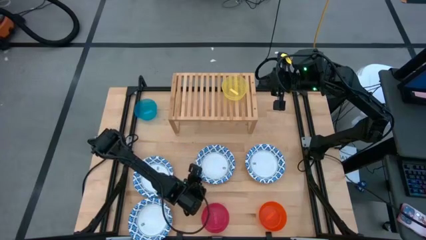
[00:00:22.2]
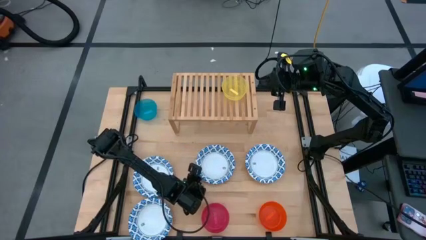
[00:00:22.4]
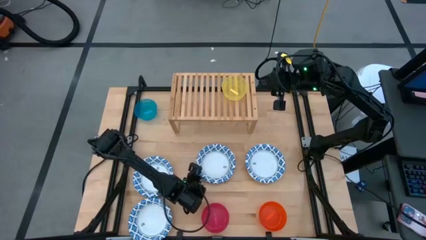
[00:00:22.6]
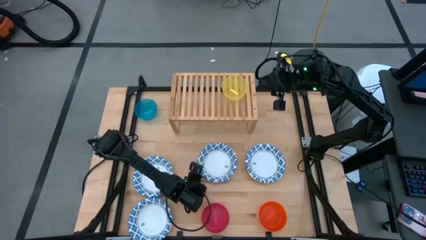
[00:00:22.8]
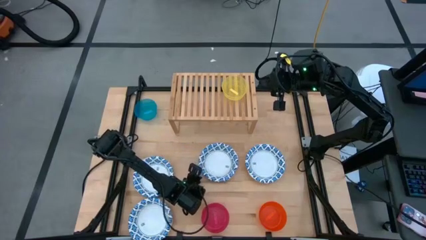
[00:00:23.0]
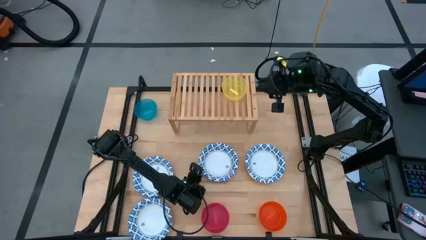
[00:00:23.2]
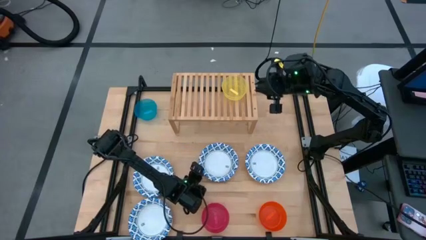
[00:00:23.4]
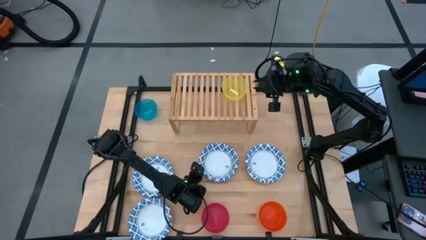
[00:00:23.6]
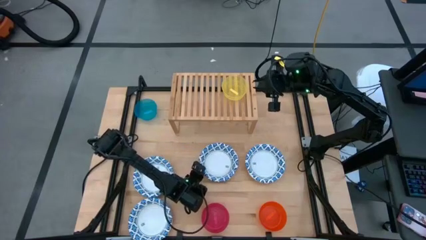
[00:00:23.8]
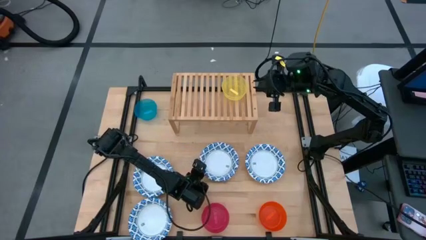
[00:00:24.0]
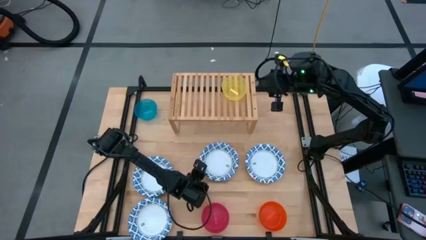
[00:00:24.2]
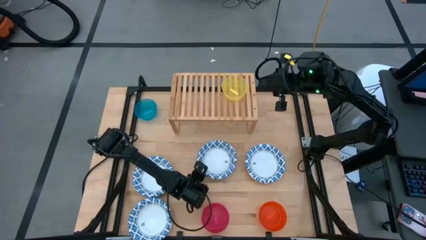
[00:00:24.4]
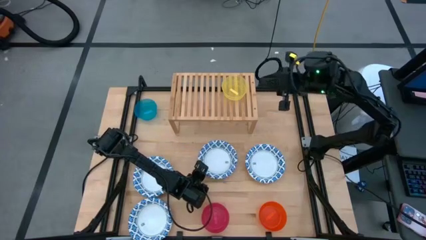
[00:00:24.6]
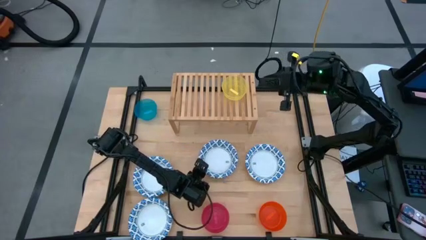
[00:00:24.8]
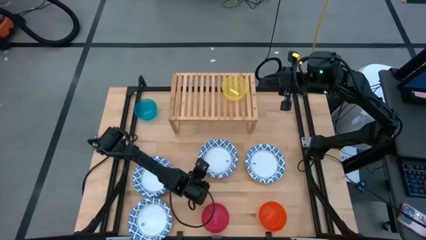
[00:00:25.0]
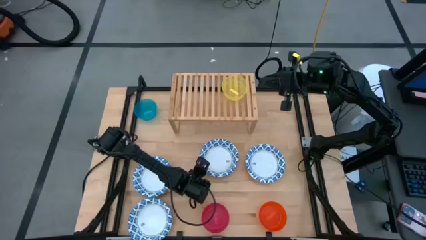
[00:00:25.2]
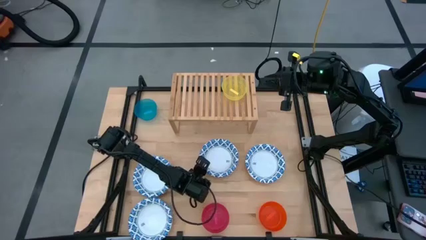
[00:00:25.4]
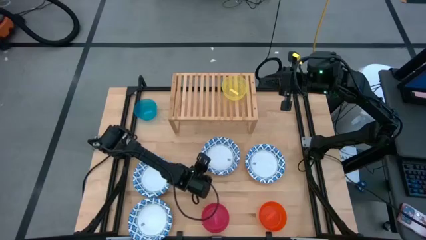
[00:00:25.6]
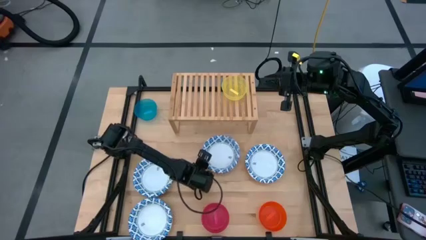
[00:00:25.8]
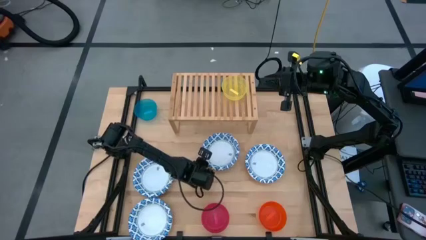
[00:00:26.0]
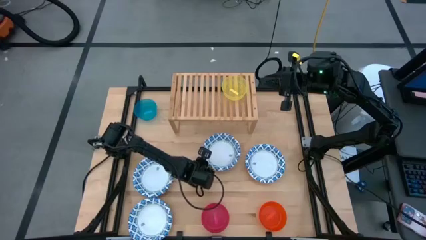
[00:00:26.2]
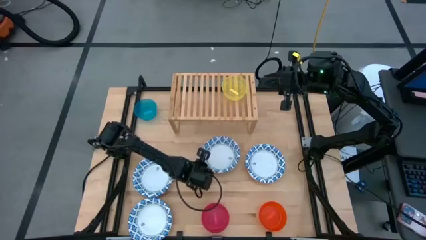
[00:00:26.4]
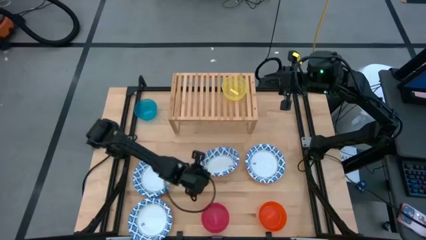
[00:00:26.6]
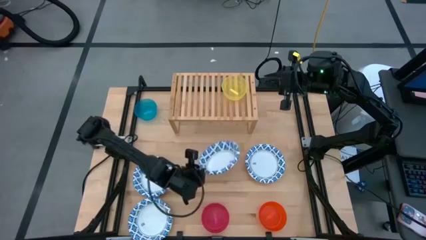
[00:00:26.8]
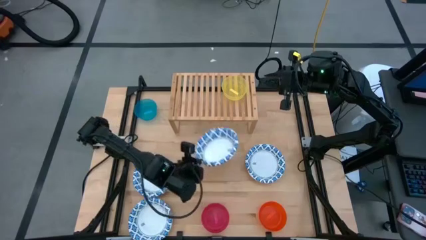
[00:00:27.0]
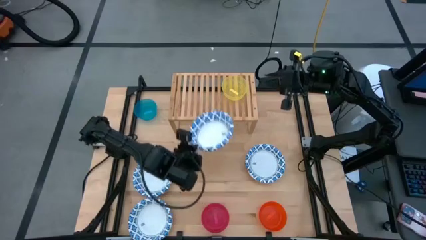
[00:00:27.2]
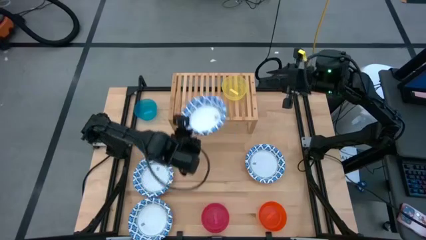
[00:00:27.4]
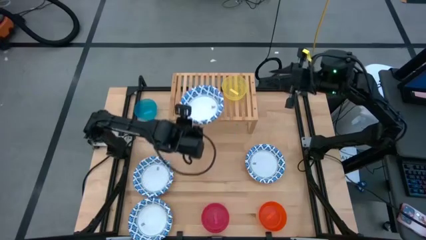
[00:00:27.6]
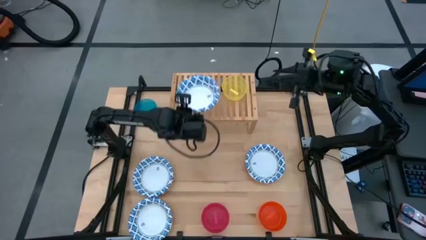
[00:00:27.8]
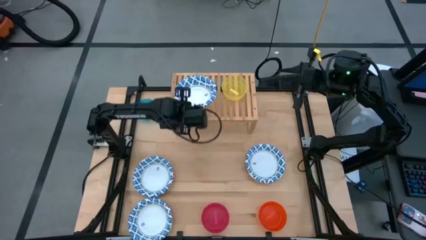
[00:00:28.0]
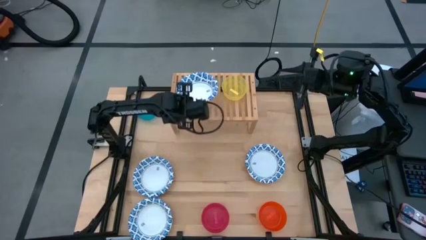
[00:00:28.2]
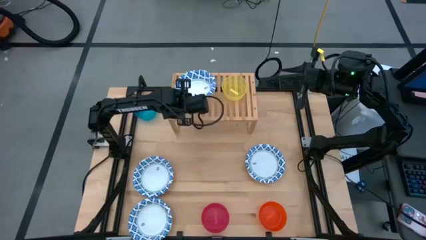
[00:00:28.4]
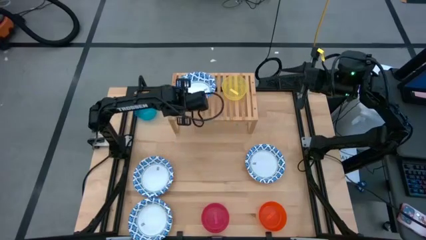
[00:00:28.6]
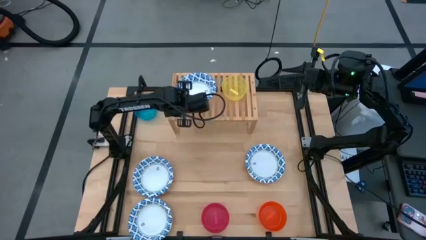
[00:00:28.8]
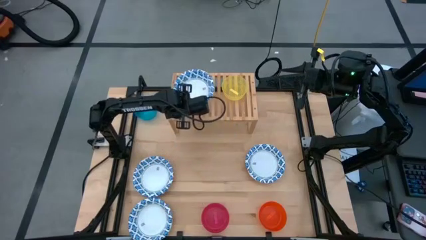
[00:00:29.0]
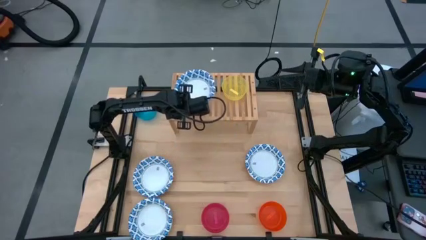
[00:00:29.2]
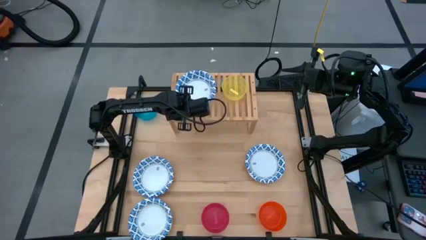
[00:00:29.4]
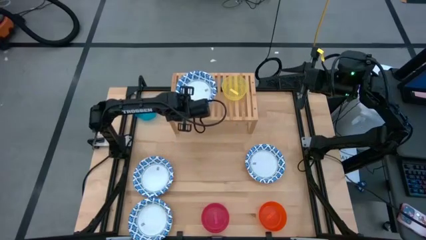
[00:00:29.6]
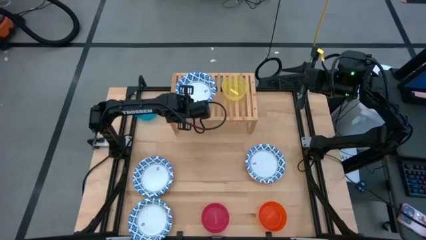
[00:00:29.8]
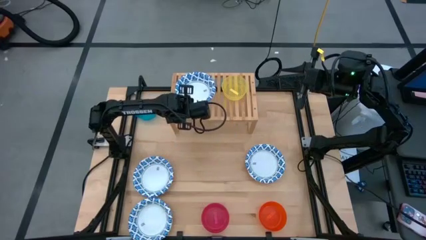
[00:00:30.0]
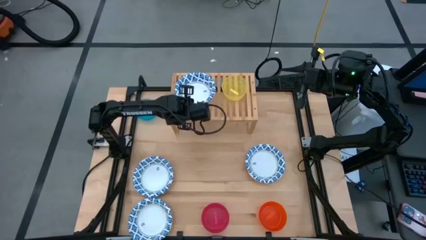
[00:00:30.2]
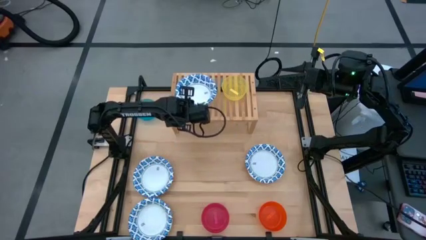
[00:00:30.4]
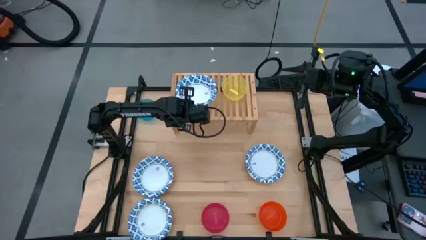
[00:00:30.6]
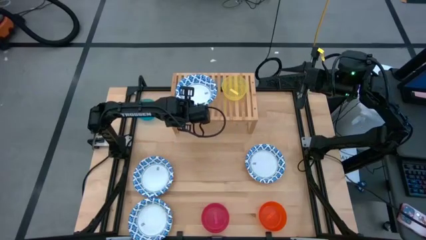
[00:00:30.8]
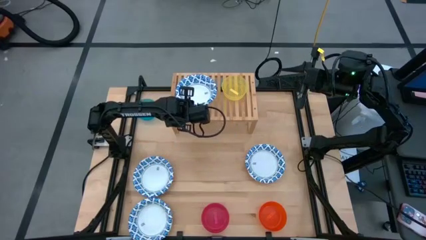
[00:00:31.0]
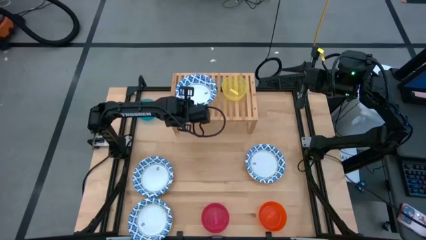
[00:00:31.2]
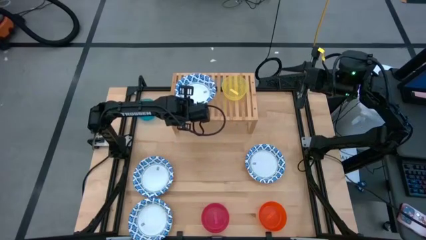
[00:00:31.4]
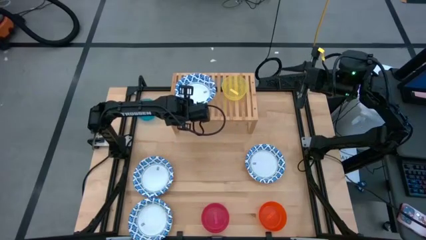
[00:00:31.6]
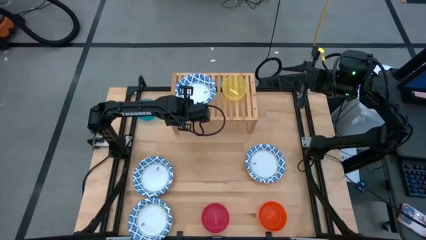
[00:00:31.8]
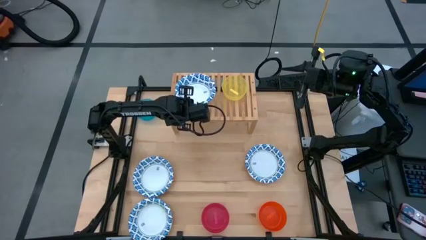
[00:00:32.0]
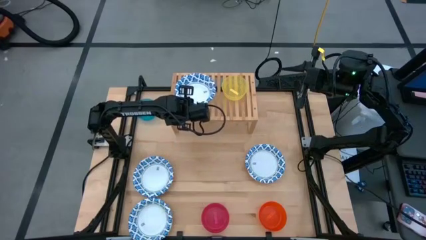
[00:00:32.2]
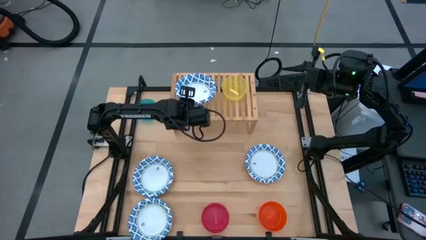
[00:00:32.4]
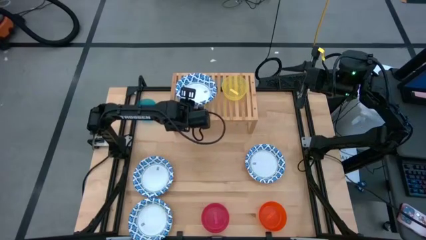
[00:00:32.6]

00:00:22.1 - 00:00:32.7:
Task: Place and stack bowls onto a shelf
Put the top middle white patterned bowl on the shelf

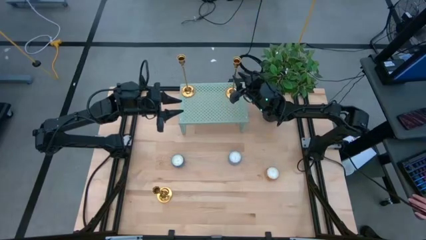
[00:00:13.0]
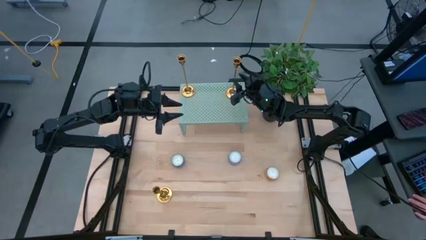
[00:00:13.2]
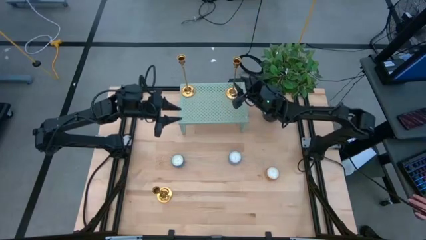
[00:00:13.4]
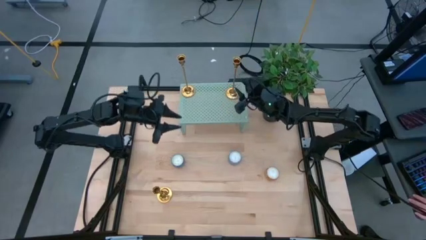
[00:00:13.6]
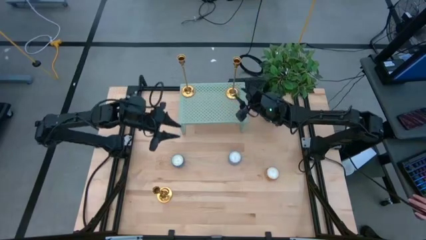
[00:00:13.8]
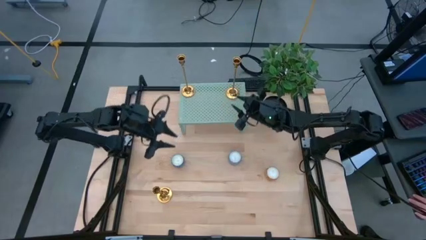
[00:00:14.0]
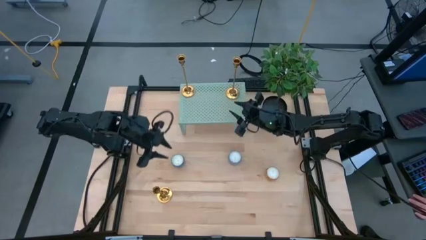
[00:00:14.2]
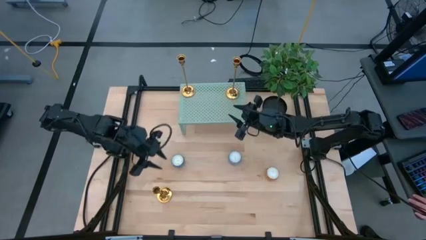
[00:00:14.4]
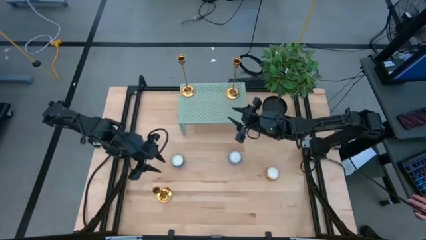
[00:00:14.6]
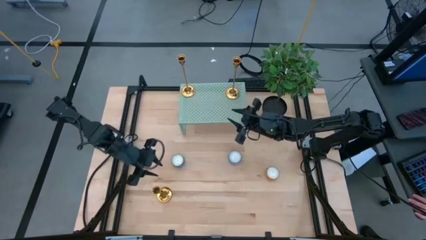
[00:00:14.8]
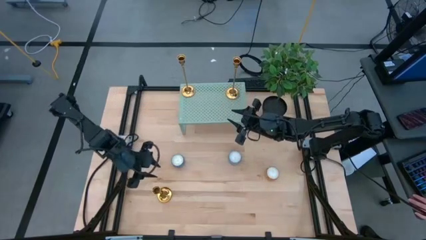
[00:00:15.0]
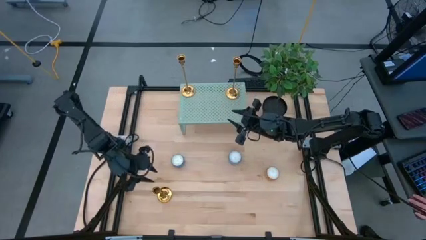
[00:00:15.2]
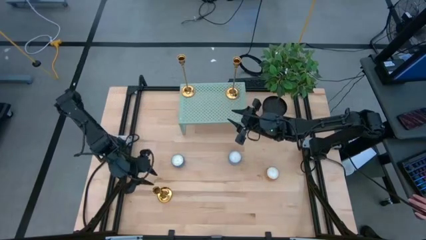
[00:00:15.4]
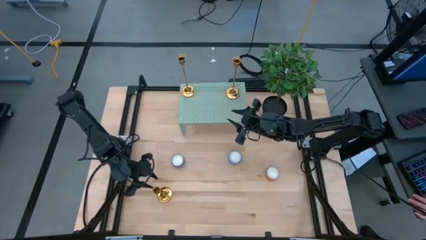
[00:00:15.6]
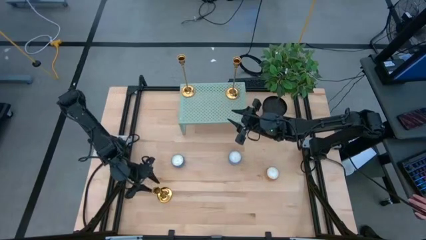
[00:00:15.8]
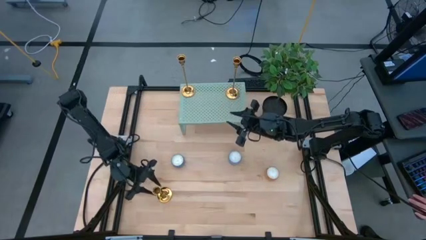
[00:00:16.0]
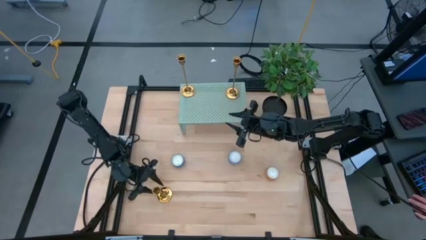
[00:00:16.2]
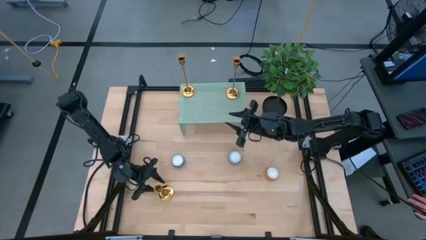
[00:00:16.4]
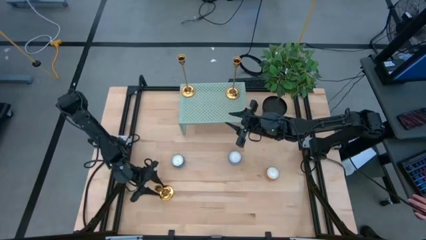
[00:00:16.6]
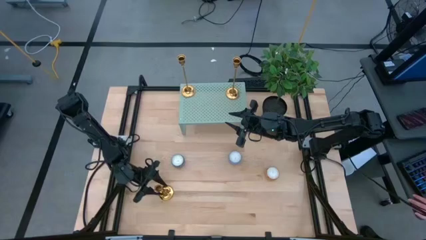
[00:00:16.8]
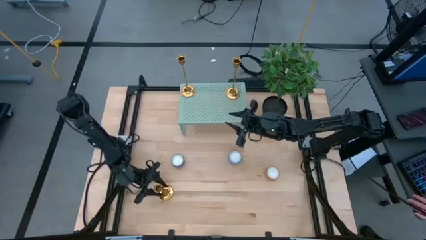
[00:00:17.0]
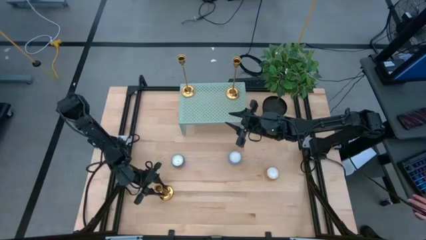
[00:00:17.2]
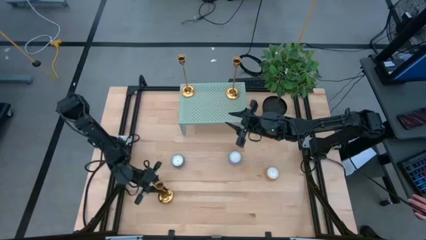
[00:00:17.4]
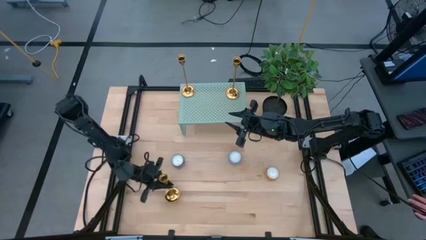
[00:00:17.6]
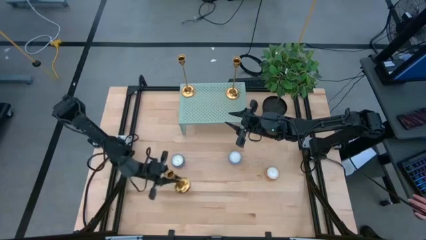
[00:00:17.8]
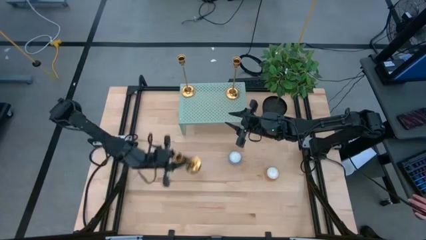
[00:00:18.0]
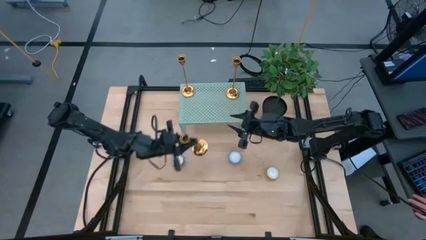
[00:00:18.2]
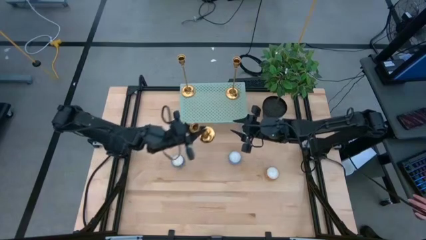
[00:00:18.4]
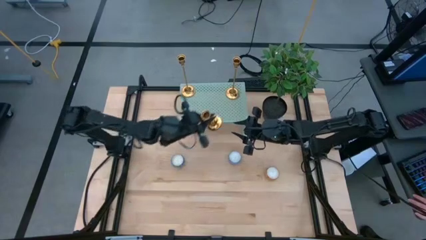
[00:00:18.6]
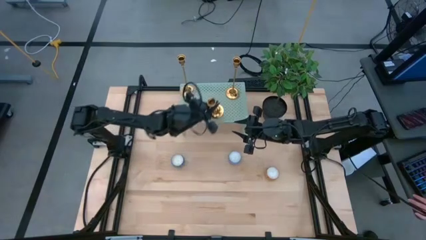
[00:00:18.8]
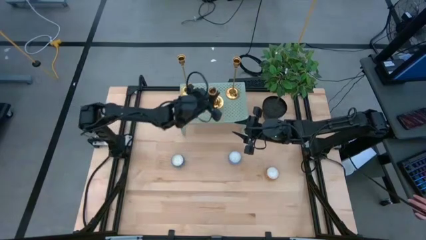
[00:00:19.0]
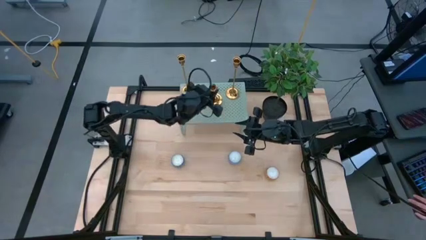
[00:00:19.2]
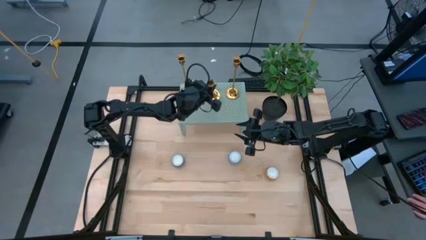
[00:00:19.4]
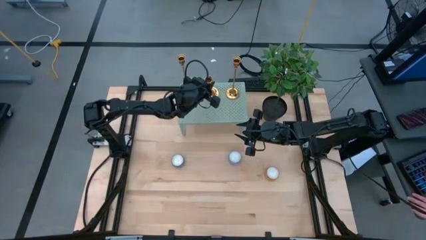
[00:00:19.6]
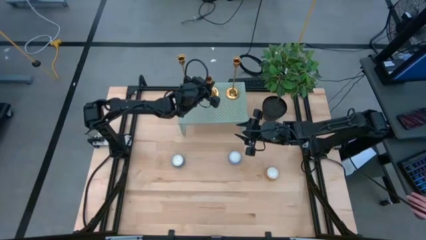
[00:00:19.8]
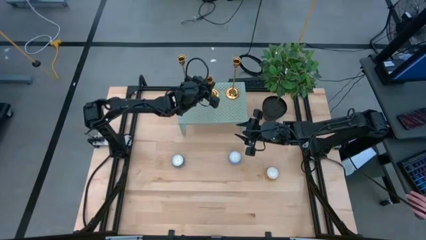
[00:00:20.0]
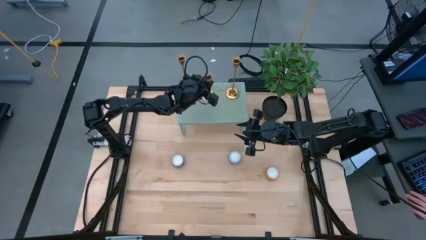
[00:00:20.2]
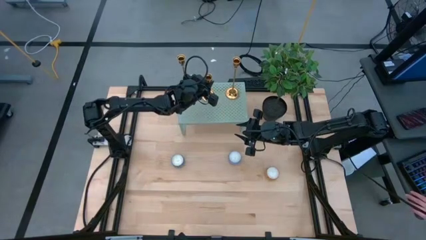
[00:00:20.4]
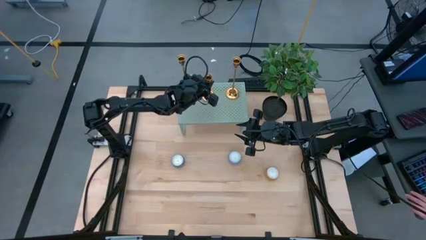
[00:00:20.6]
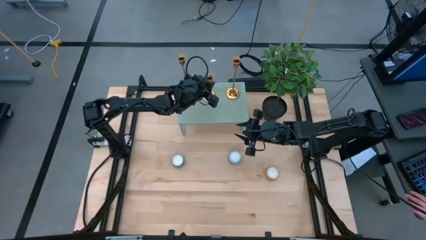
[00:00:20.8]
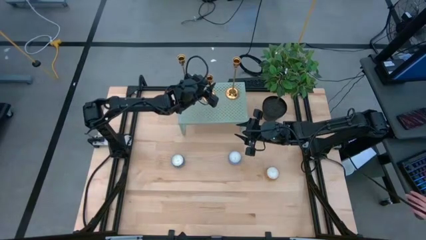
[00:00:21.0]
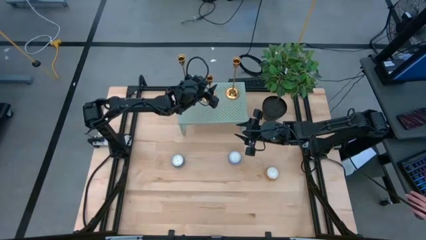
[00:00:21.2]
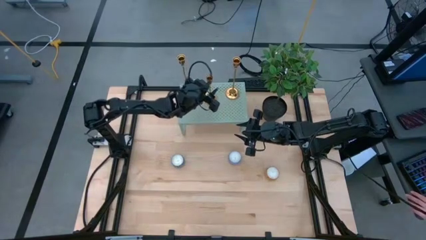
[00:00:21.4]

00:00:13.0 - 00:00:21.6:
Task: Pick & Place candle stick holders
Put the gold candle holder on the shelf
